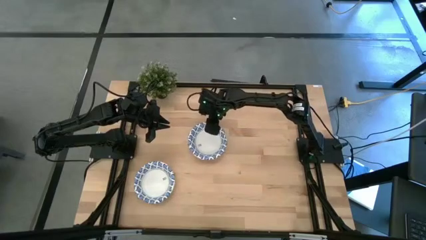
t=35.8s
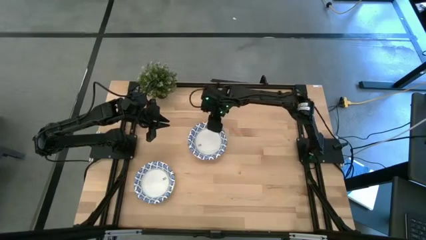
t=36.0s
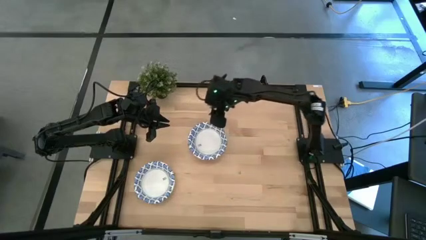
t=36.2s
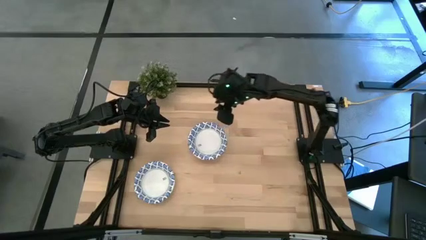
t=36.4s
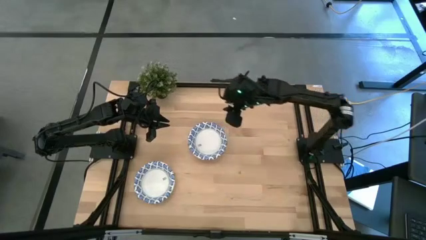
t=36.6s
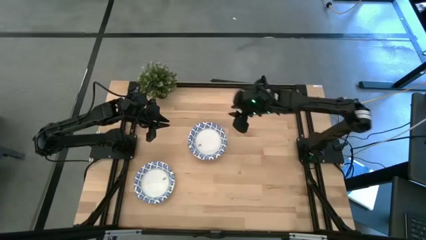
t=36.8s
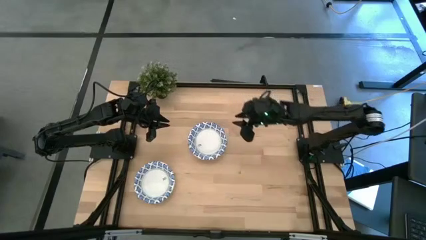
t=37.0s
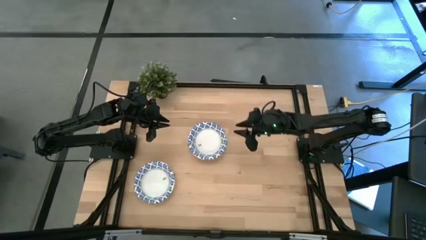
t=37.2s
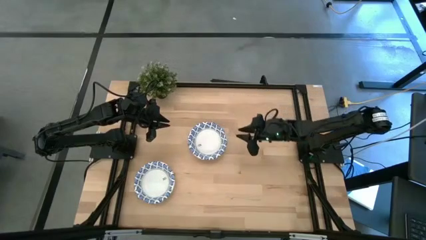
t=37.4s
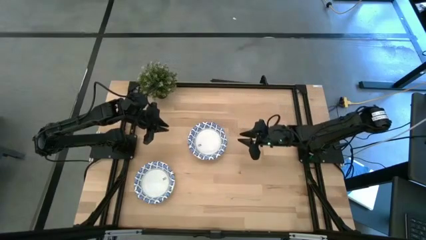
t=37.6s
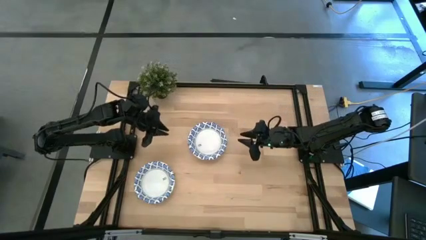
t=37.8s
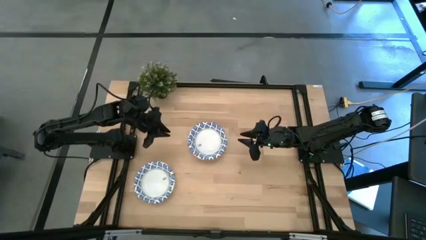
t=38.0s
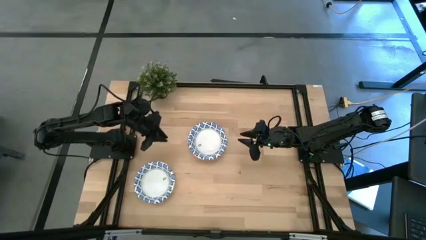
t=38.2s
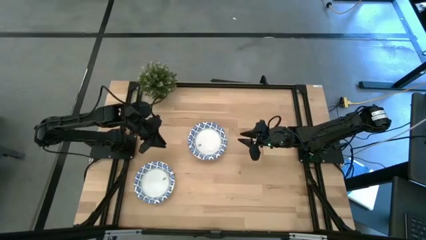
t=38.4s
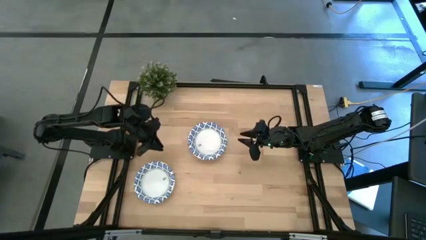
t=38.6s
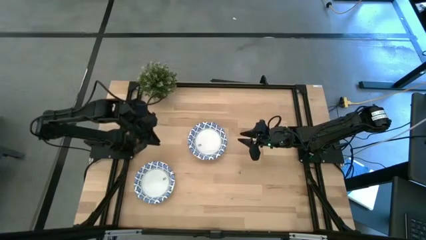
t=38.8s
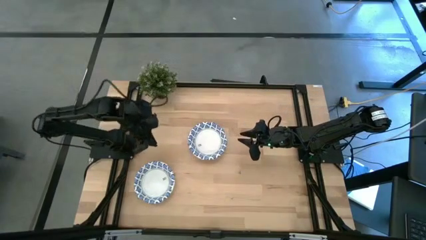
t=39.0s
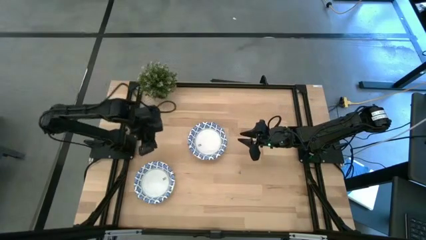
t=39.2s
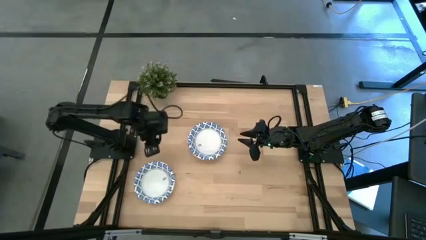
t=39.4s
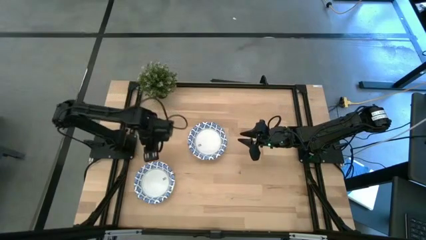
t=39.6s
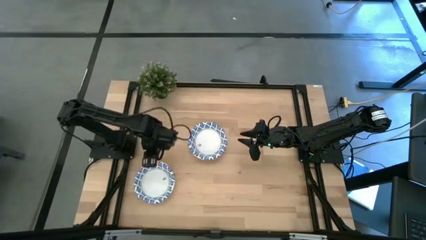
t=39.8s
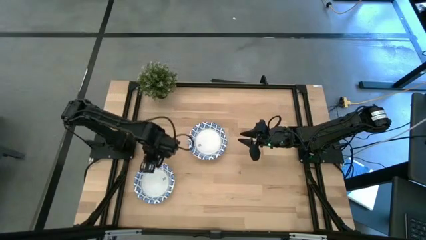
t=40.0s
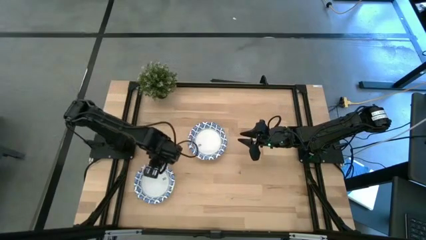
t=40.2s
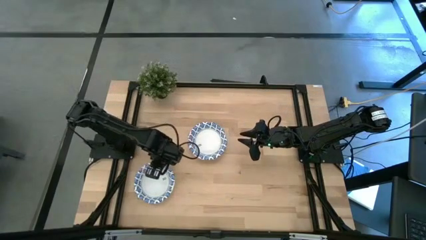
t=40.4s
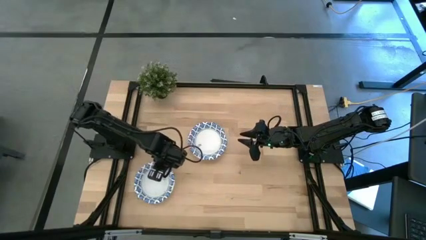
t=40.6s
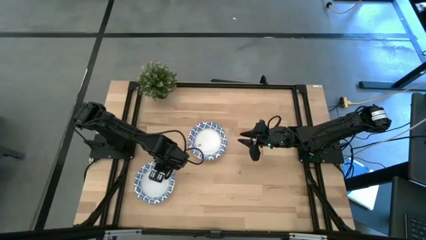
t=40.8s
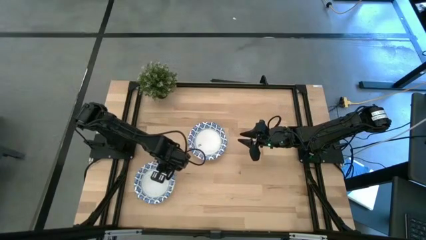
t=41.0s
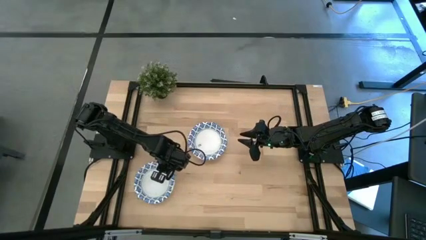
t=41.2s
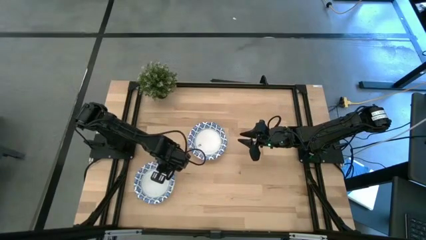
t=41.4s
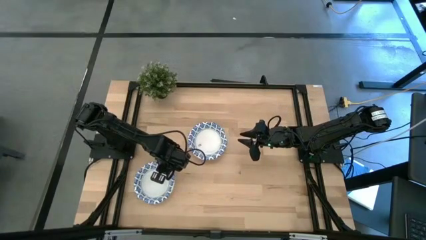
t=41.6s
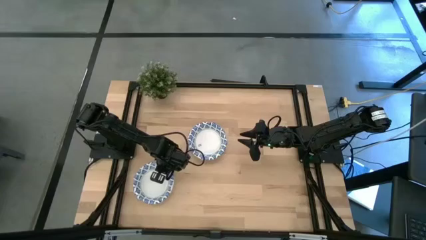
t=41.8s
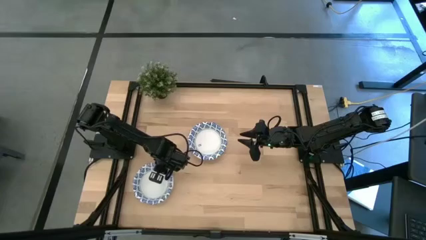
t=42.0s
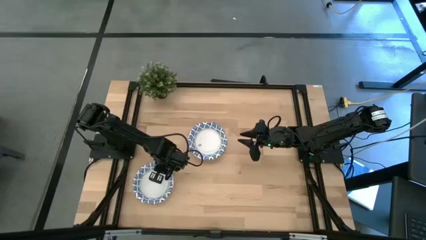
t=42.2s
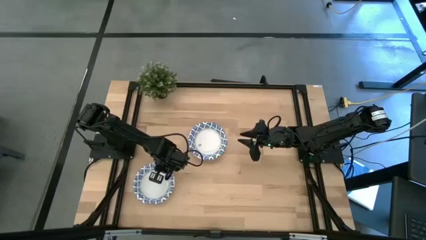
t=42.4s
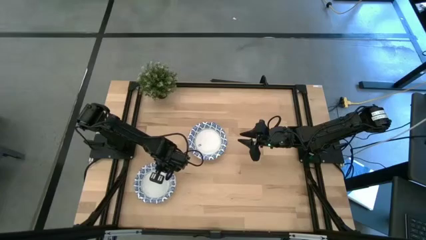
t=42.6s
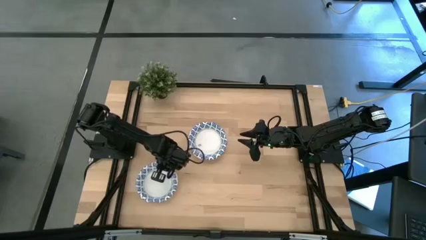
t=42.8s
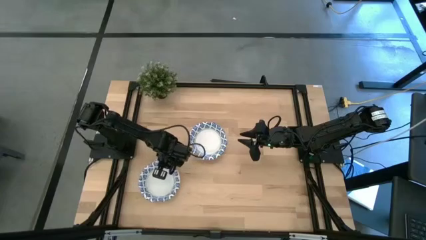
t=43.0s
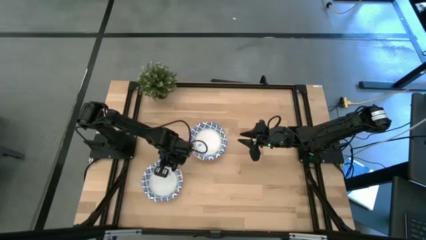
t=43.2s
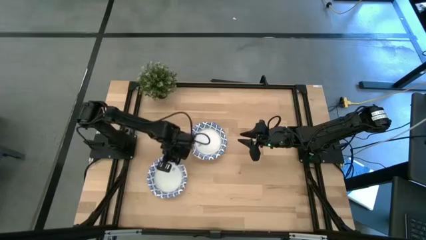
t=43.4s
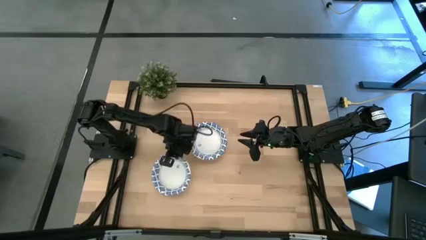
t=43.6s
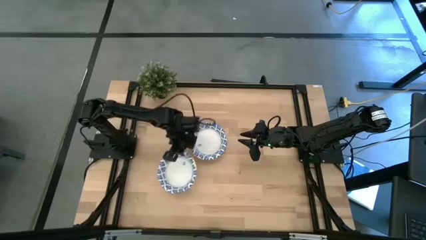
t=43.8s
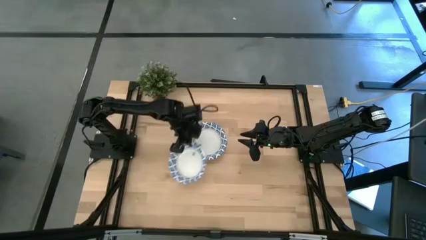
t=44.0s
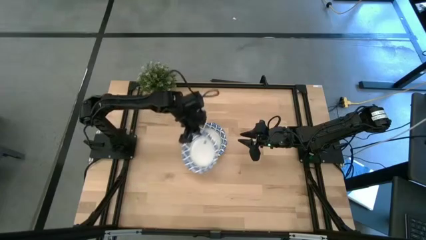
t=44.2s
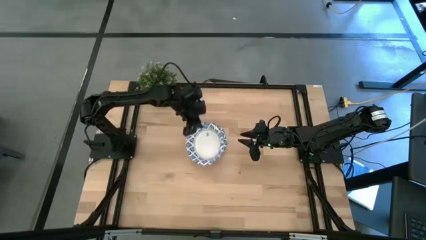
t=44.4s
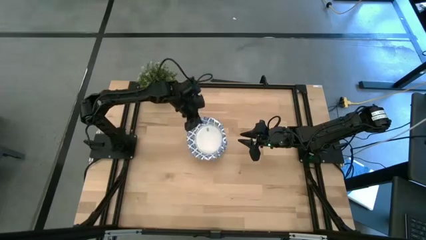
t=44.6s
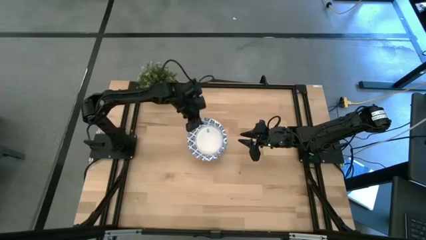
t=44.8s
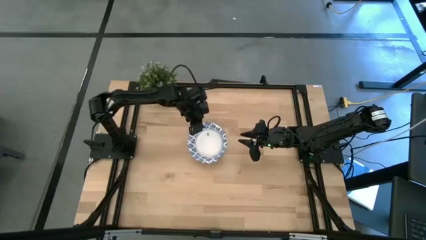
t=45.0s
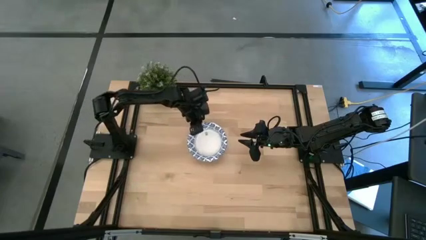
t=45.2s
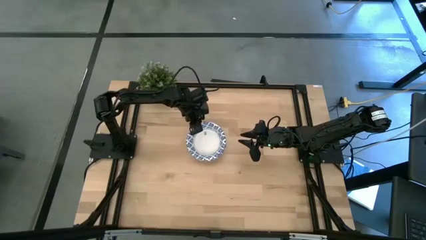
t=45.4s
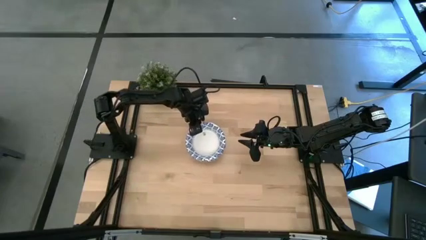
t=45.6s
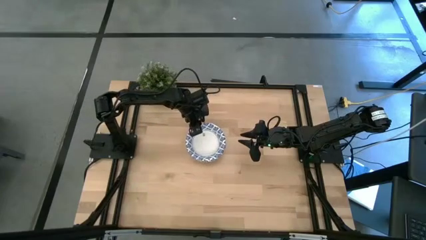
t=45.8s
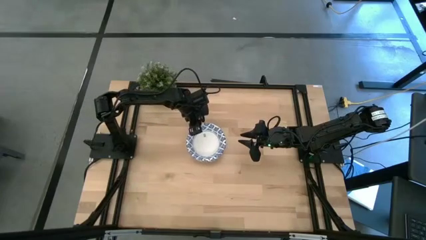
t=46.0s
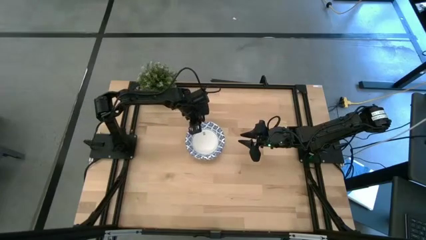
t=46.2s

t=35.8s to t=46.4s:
Task: Nest bowls inside each other
Stack the white patterned bowl on top of the right white patterned bowl

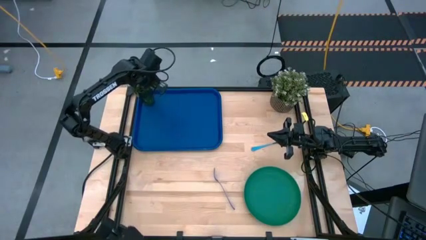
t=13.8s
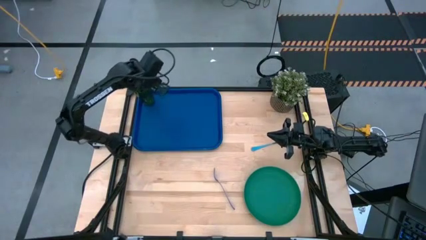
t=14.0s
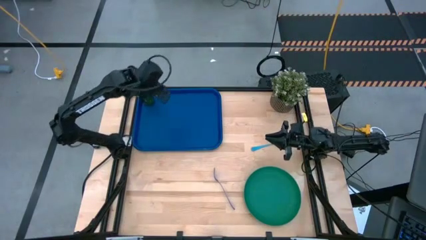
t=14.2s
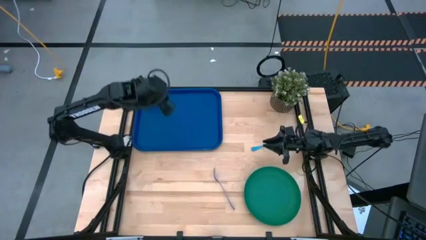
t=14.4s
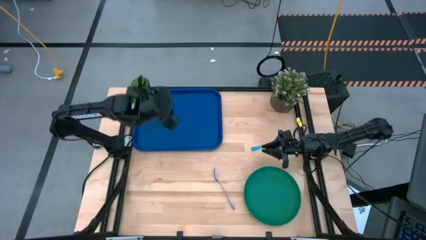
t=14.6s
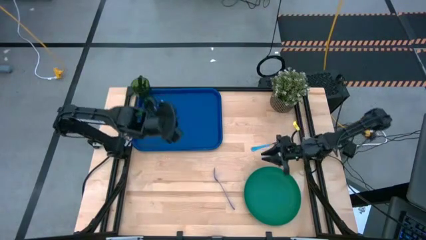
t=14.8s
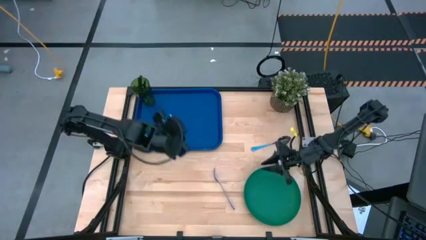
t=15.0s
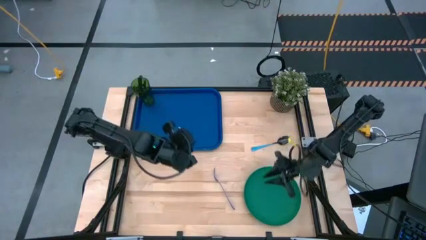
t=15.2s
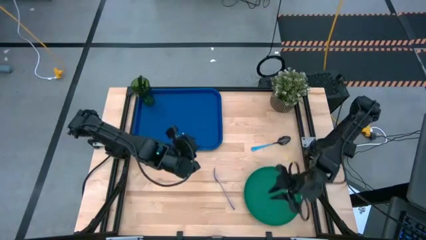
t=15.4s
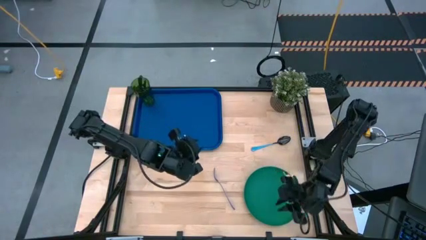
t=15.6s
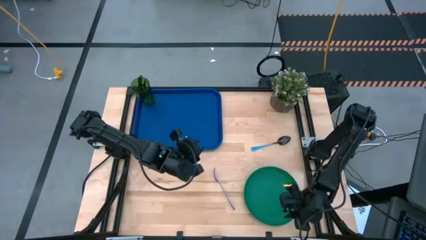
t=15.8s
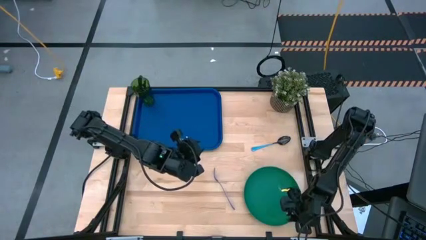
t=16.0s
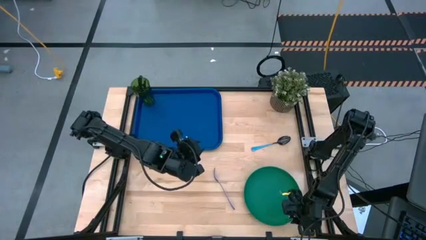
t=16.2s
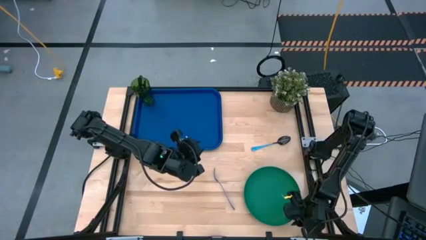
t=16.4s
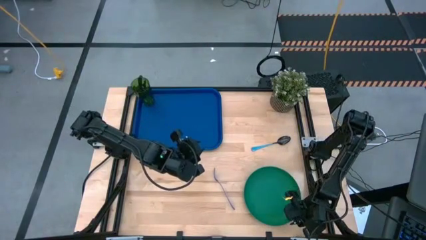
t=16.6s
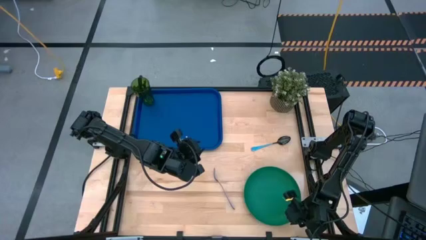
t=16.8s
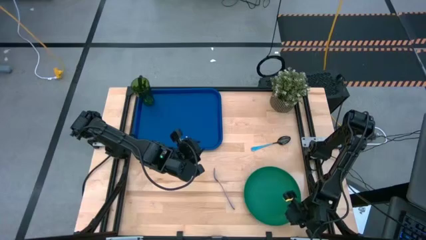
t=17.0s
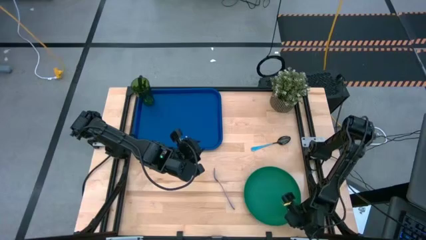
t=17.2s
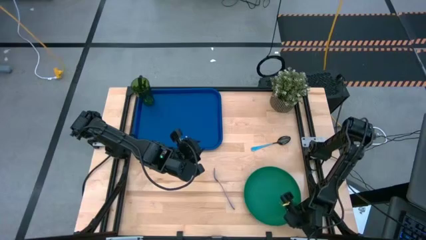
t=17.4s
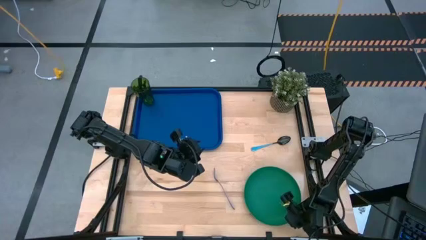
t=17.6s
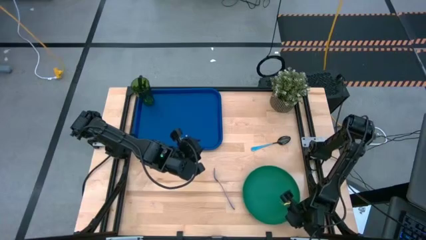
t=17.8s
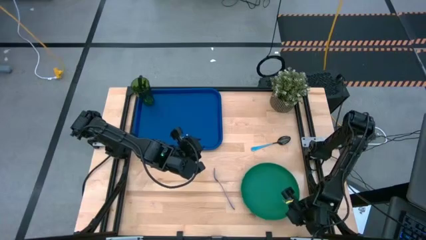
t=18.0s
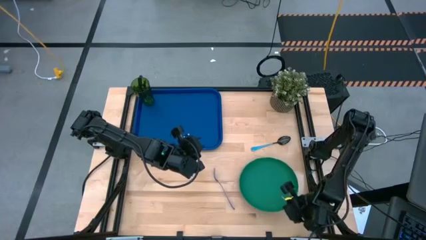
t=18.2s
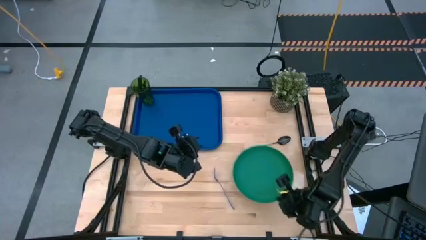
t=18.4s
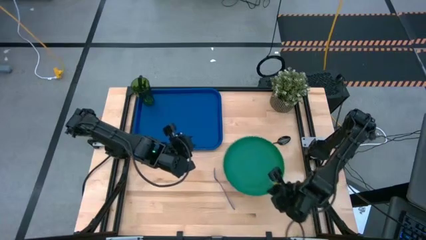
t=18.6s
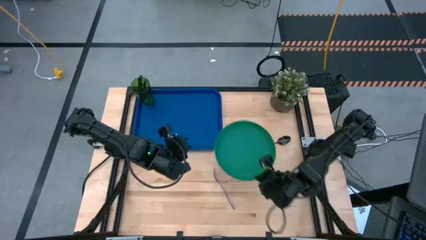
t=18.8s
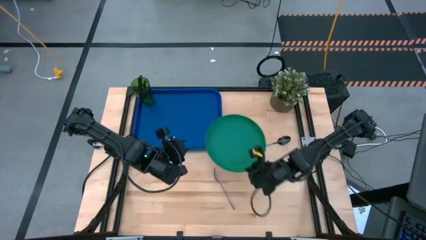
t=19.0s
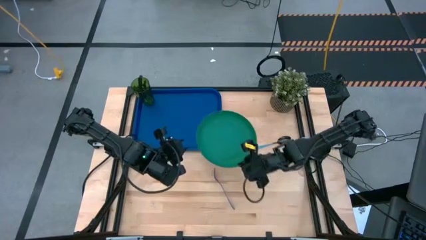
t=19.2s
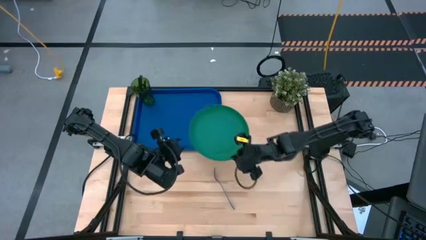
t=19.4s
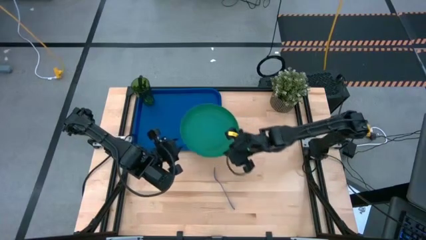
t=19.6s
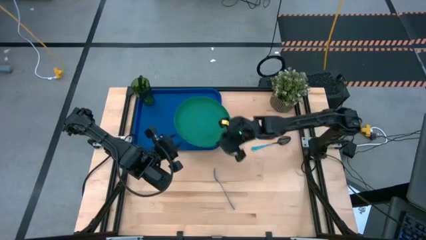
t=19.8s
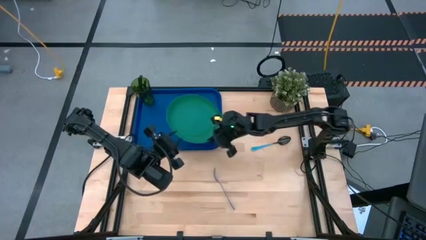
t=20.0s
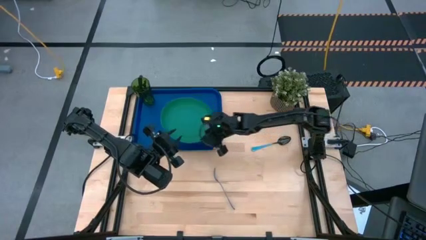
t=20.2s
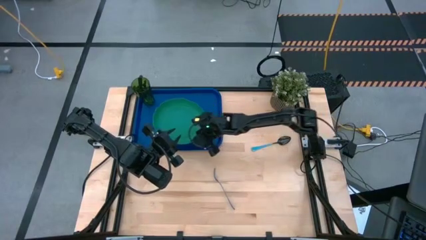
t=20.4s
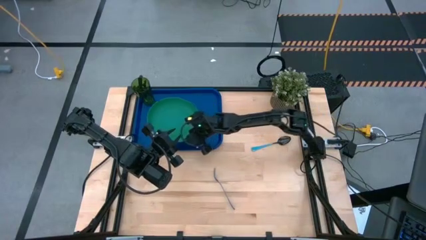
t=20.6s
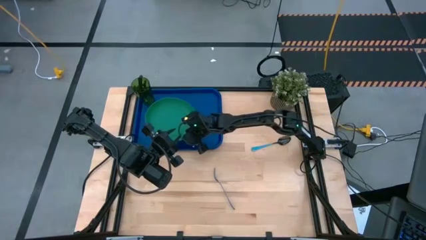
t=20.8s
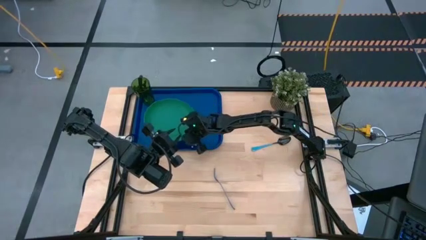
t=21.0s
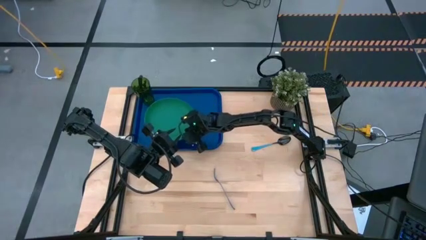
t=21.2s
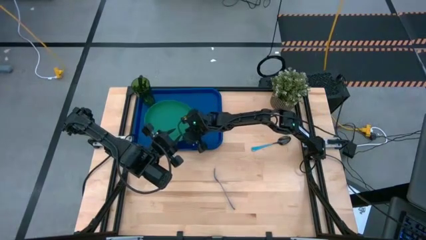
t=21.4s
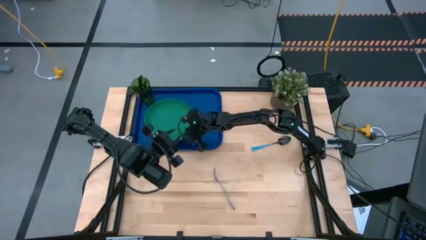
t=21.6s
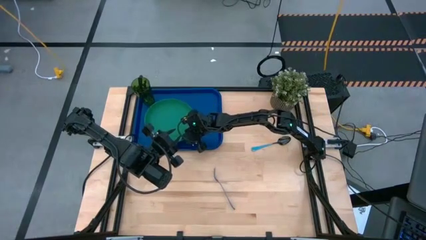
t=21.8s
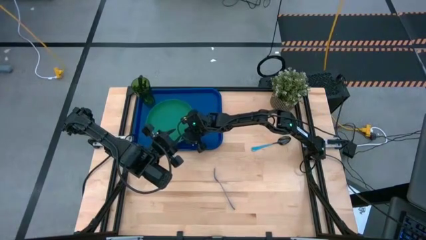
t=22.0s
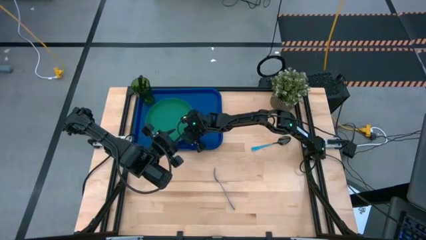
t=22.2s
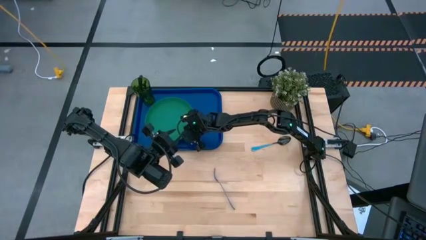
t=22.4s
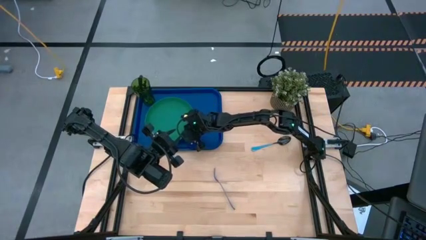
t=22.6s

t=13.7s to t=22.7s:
Task: Pick and place plate/cup/fork/spoon on tray
Put the green plate on the blue serving tray to the bottom right of the green glass
